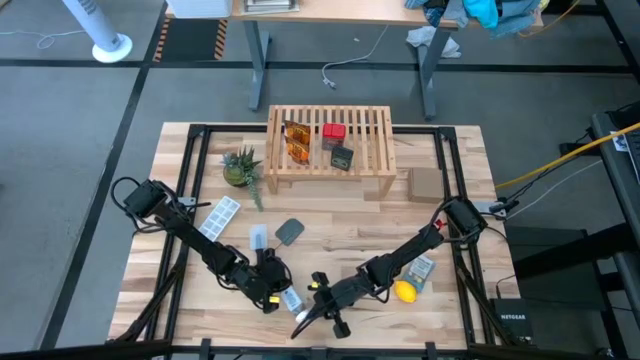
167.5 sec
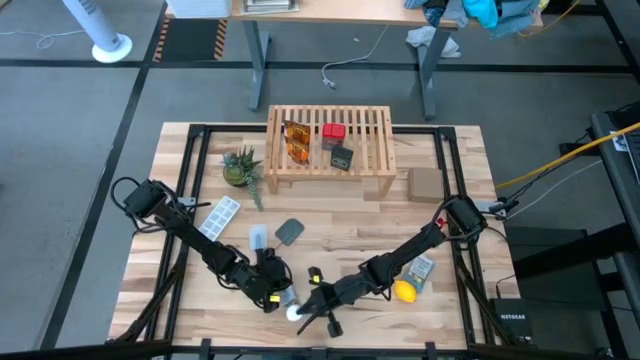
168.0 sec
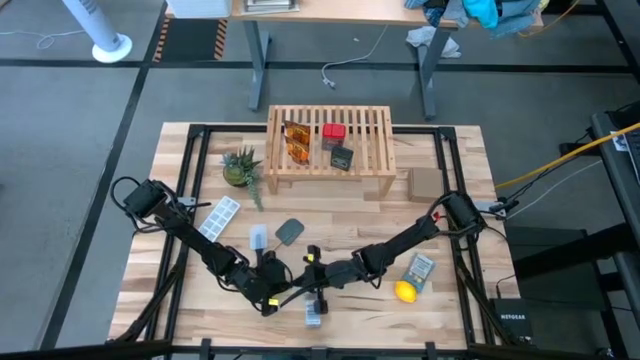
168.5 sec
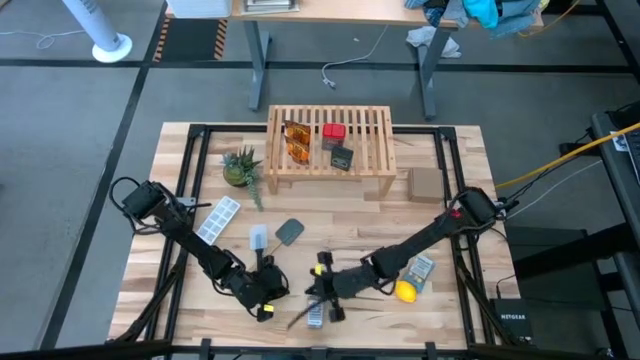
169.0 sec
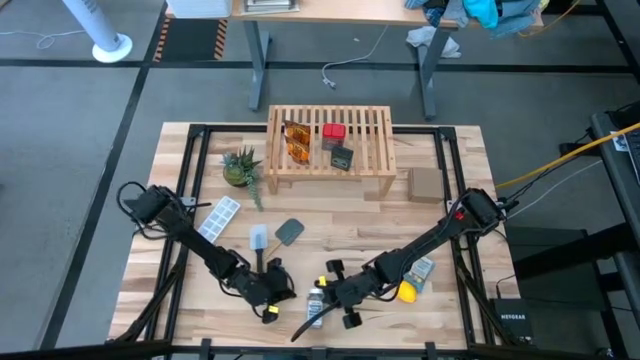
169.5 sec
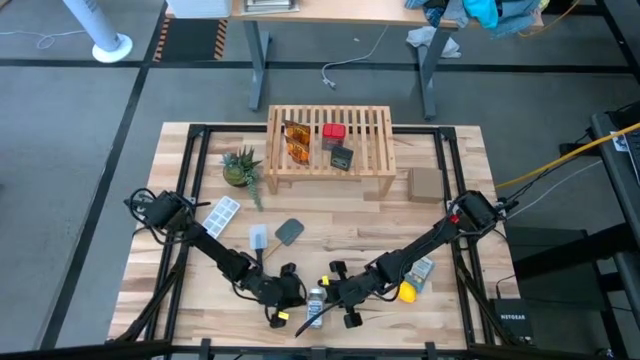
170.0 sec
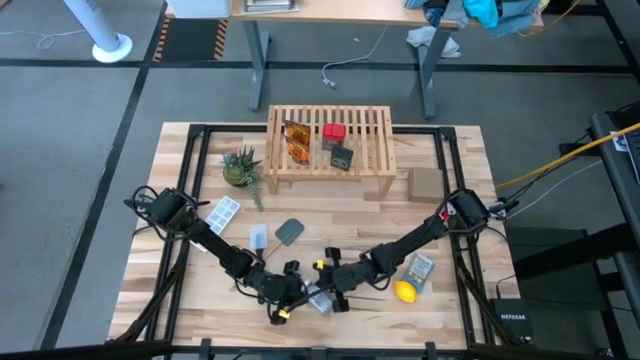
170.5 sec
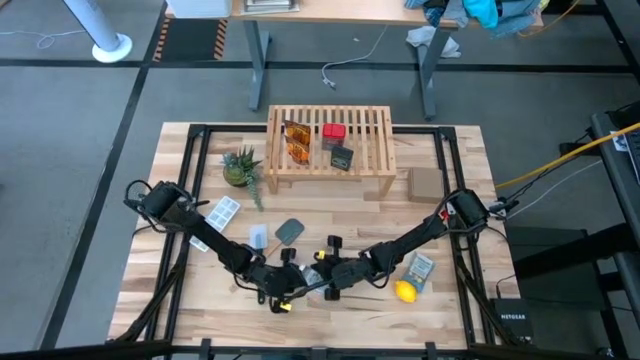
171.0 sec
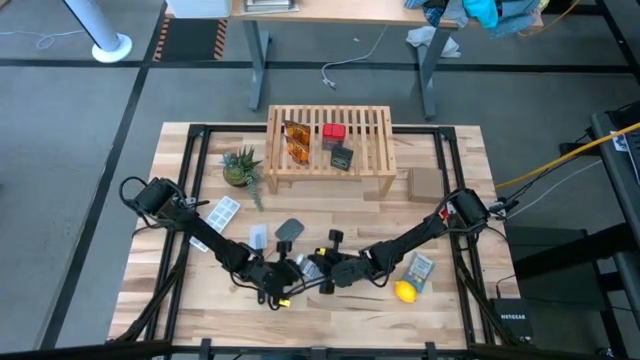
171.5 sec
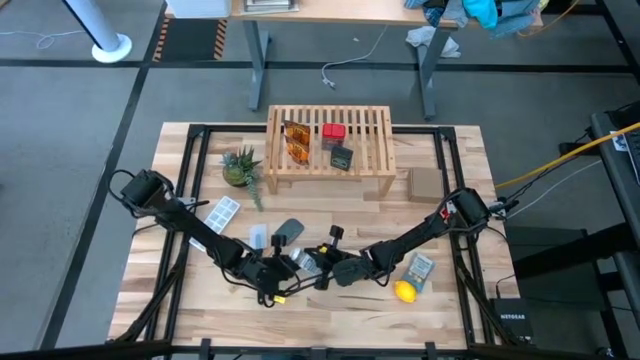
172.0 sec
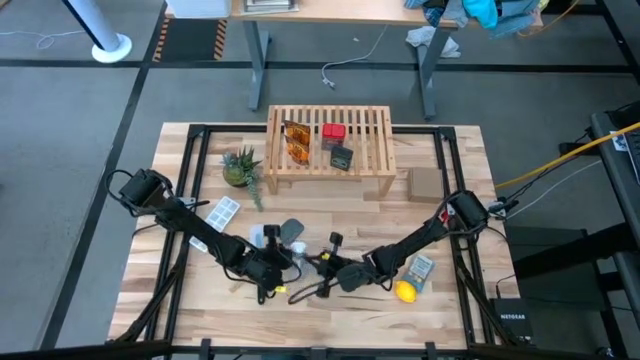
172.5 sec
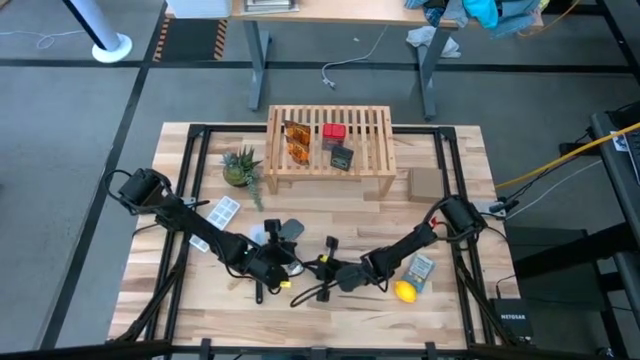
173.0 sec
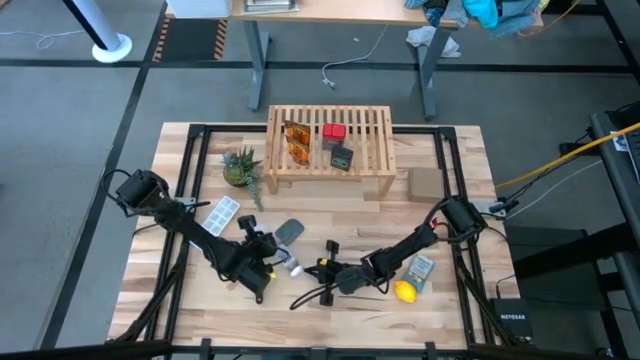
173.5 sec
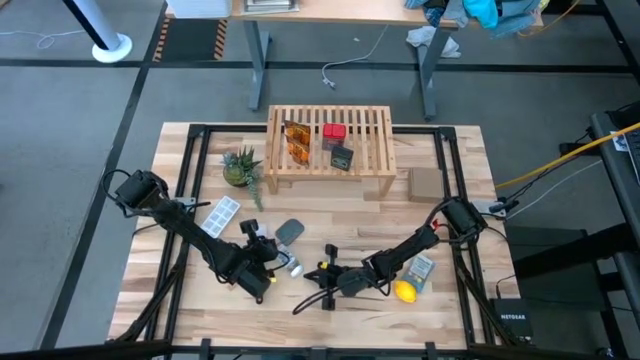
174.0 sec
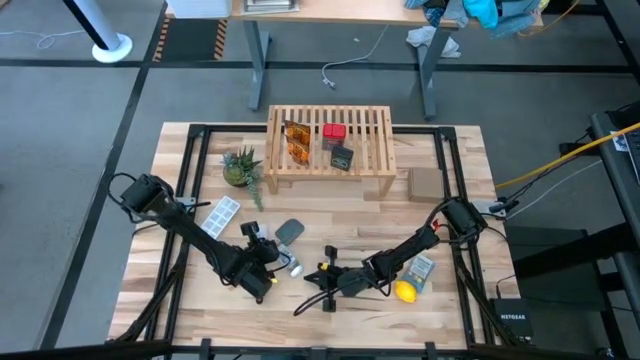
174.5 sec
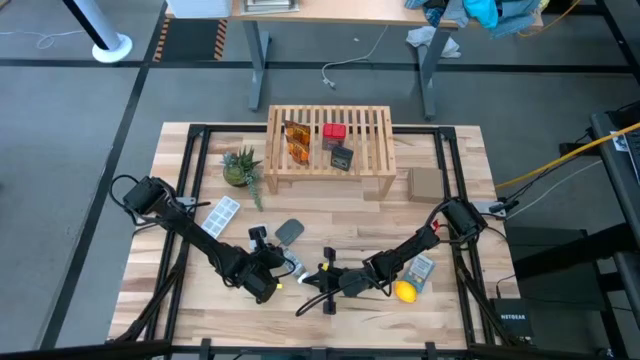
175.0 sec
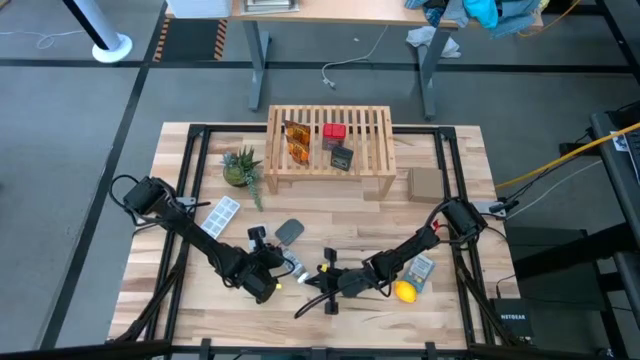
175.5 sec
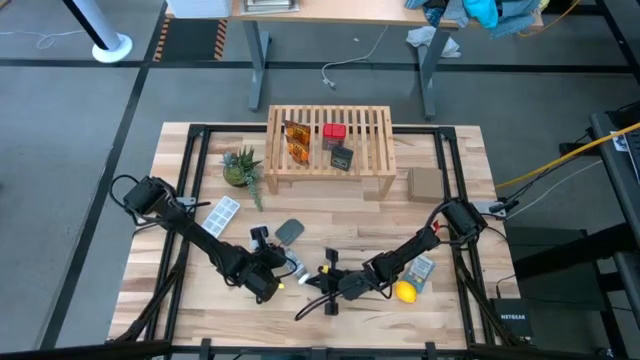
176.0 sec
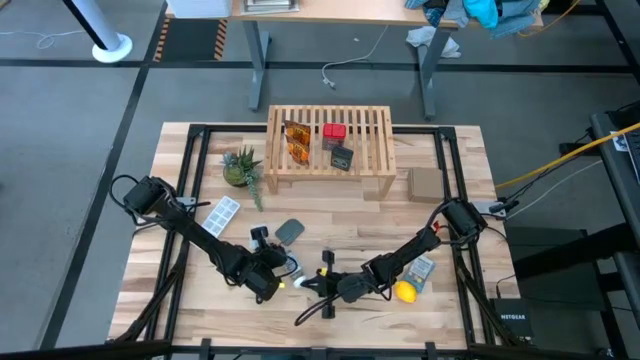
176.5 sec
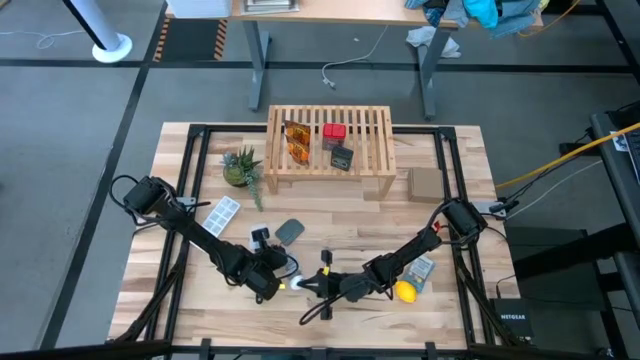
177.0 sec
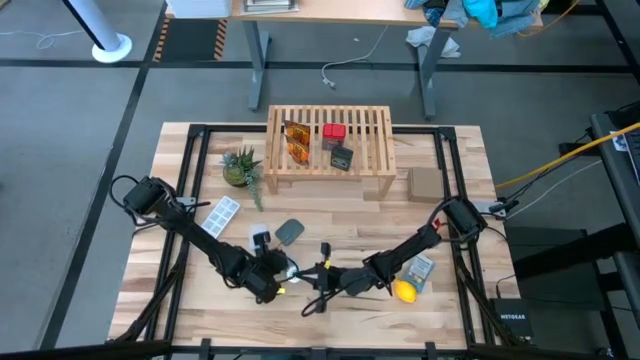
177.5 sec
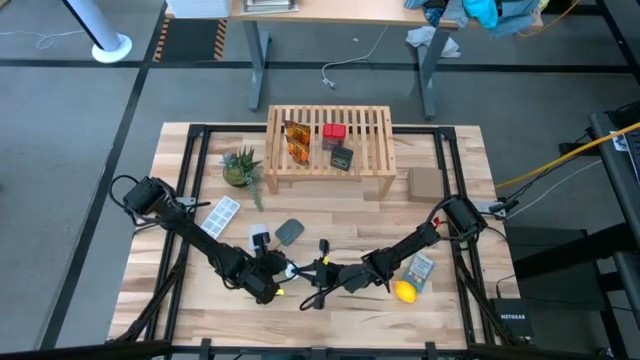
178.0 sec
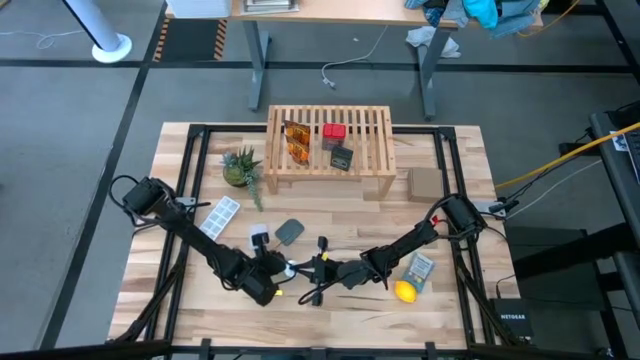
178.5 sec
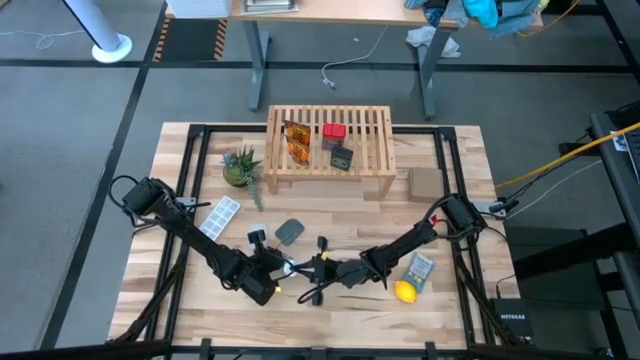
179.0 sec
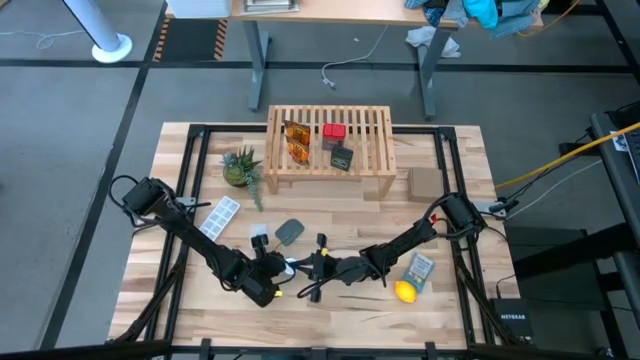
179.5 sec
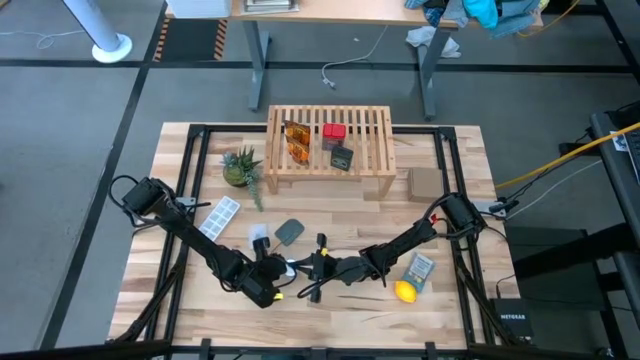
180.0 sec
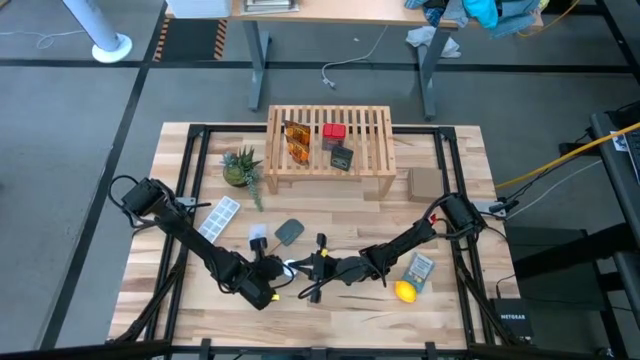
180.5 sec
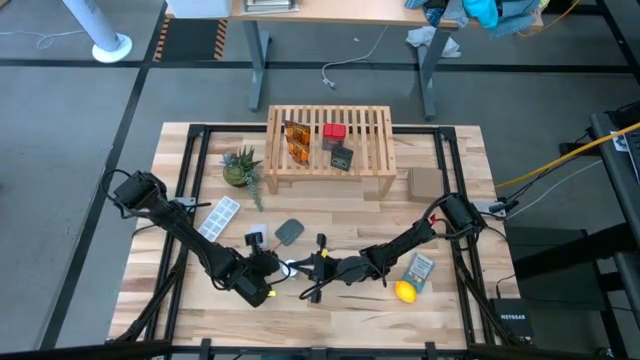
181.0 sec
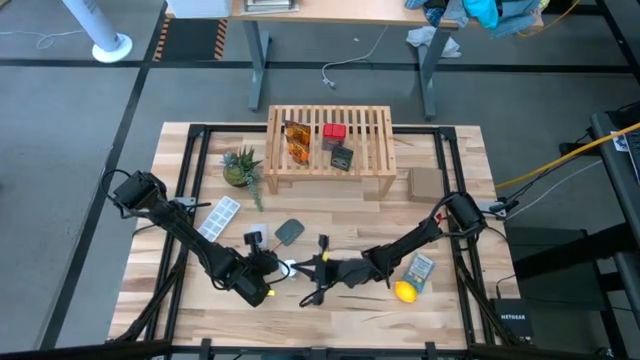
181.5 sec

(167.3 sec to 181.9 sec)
Task: Shelf spices
Put the white seasoning bottle on the shelf
